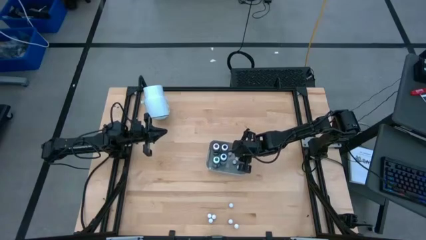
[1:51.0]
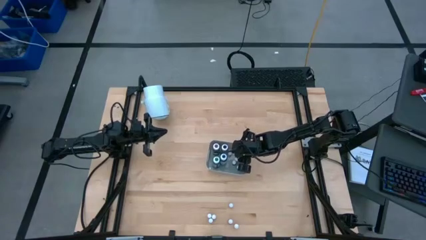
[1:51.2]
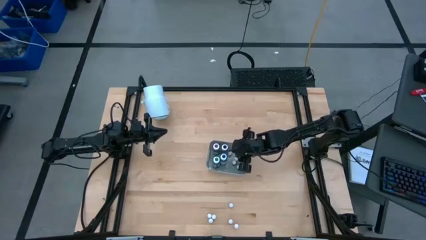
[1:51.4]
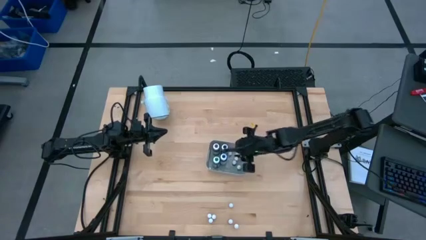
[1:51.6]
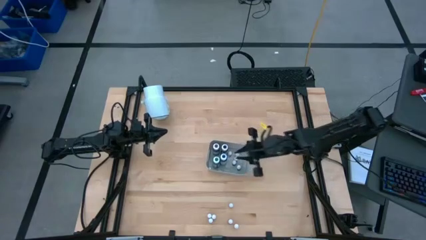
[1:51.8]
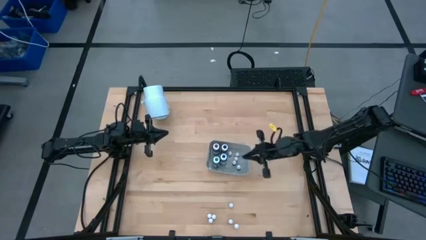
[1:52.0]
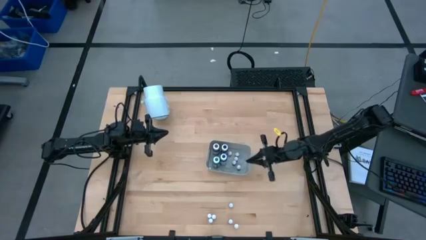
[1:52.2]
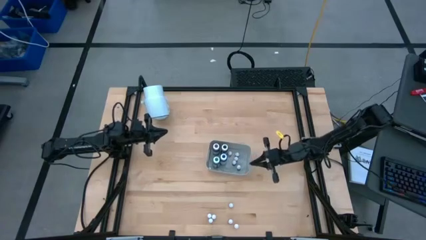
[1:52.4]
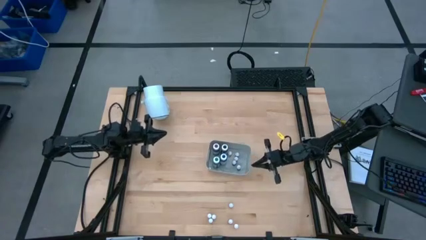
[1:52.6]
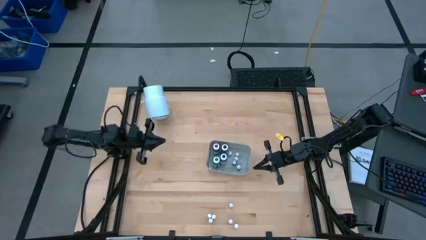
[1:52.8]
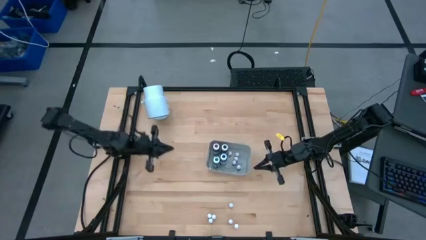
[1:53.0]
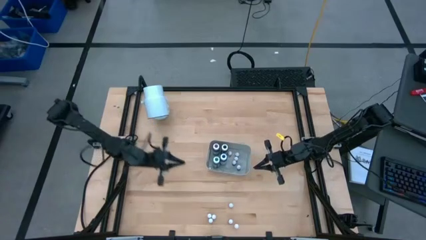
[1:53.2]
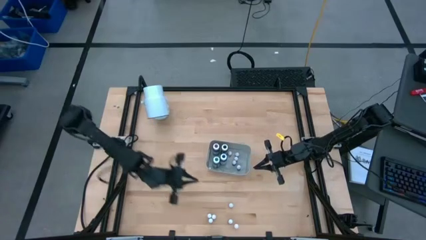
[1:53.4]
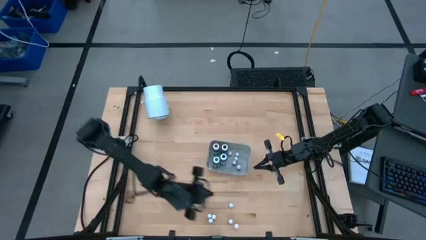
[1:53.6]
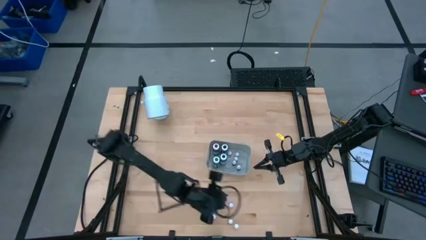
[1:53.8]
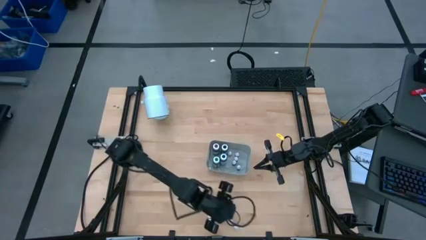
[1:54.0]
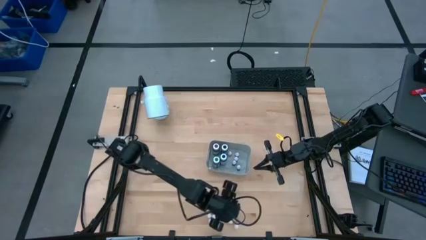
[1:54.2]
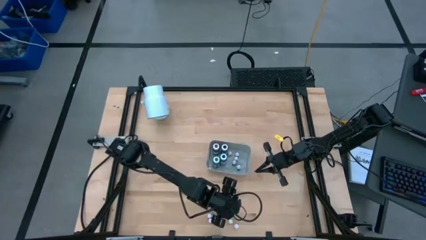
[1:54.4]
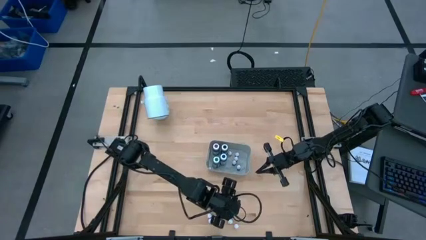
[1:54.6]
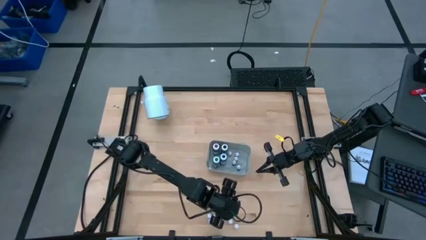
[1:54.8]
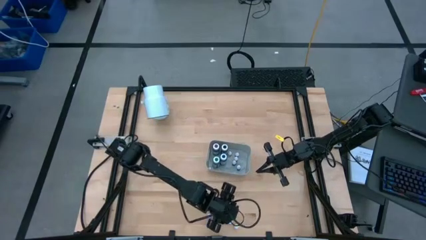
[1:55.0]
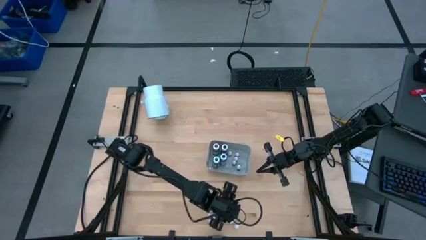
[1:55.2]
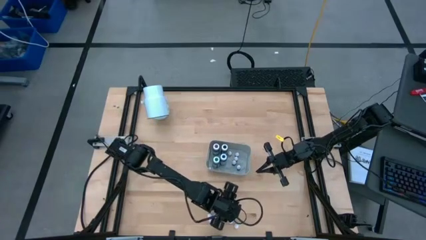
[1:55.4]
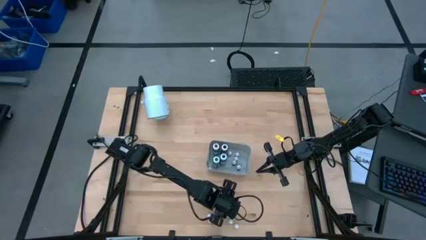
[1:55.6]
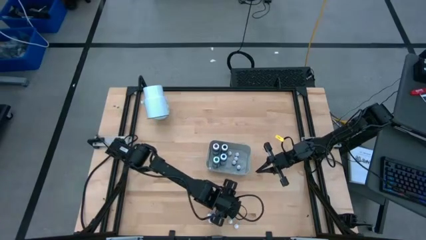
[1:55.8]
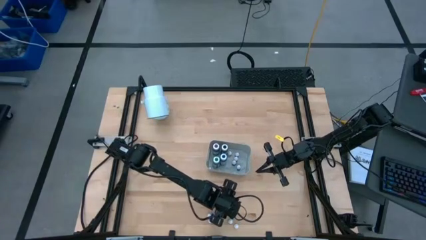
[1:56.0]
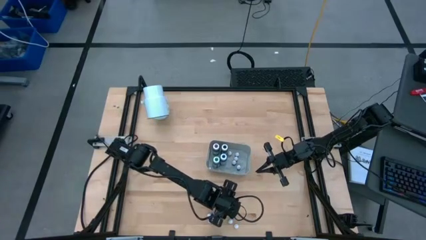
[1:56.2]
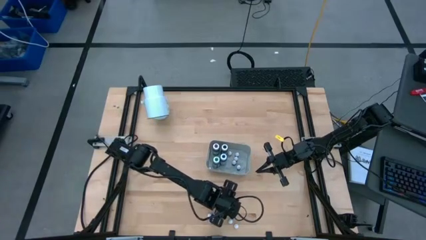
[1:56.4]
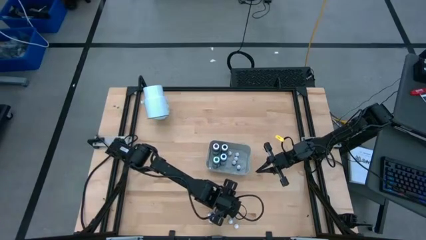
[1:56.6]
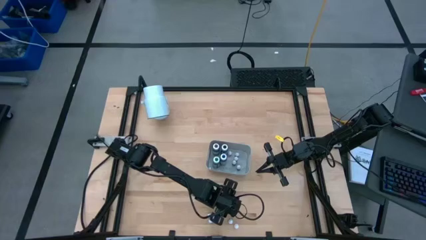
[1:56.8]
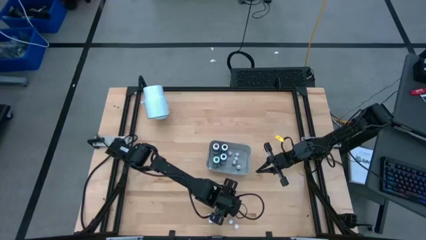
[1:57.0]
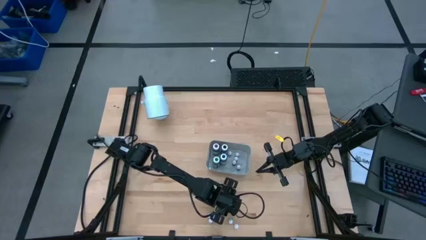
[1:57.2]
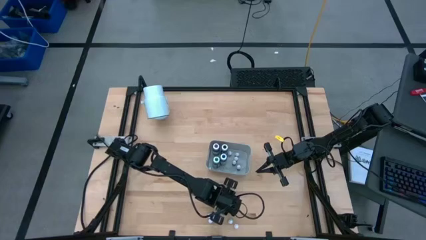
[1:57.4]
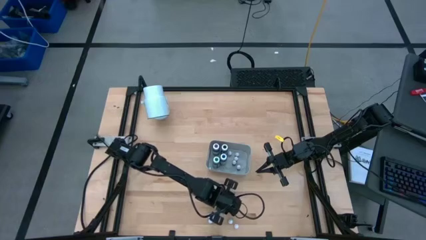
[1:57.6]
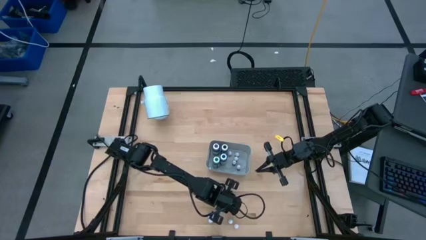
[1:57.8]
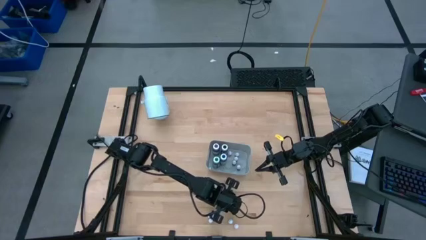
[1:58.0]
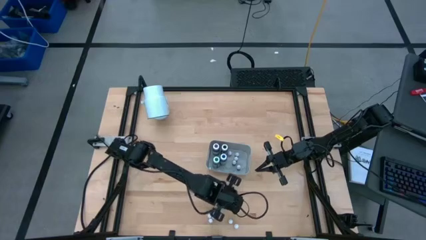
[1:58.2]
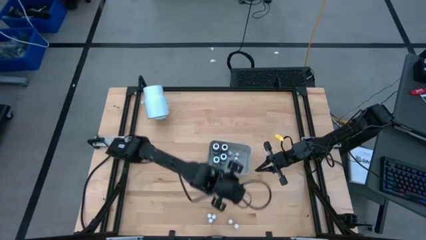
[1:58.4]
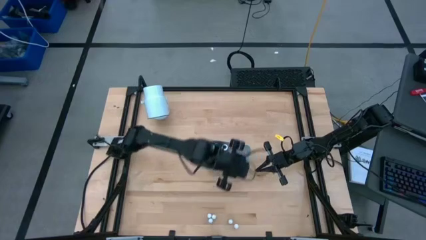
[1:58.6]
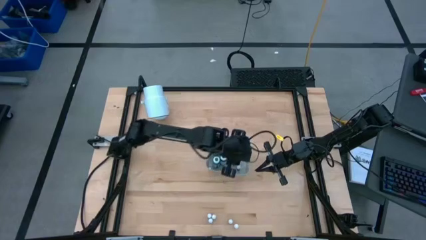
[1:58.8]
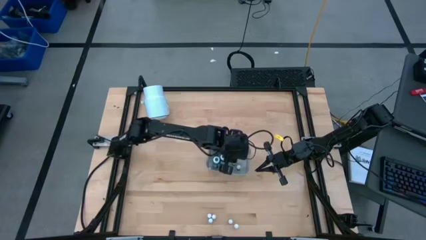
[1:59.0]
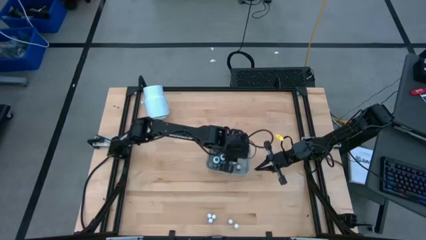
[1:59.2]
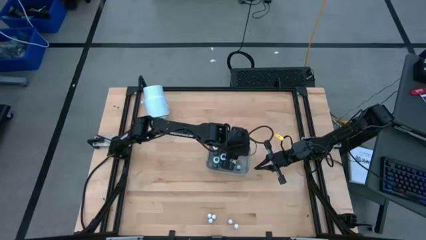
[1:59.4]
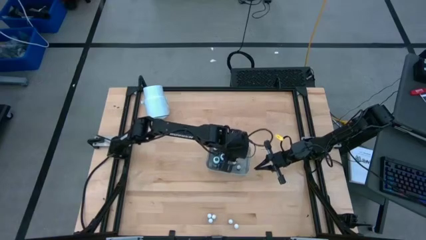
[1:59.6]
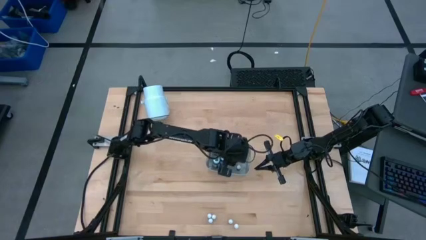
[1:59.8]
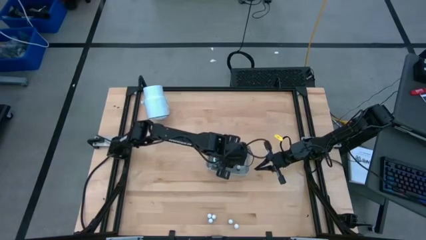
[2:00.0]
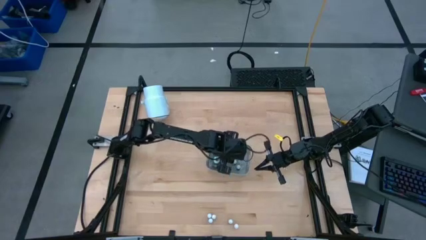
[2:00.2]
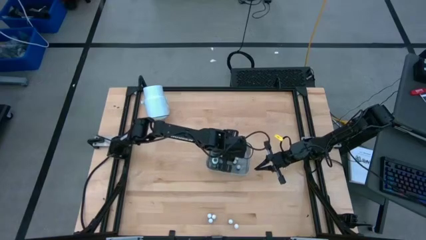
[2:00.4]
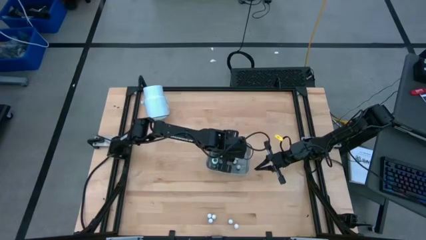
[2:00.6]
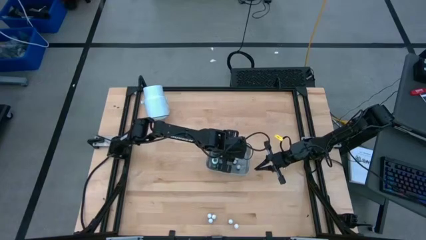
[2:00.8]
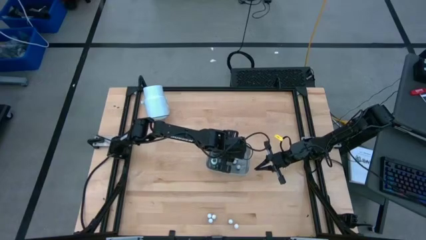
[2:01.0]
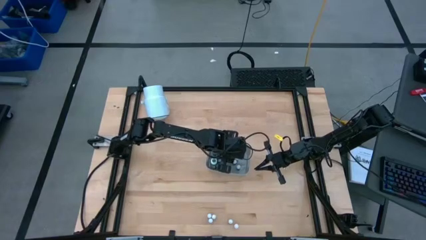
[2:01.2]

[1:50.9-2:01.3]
Task: Pick & Place food coloring
Put the small black food coloring bottle into the bin

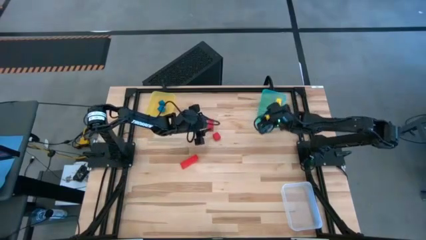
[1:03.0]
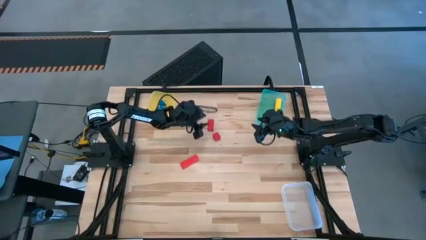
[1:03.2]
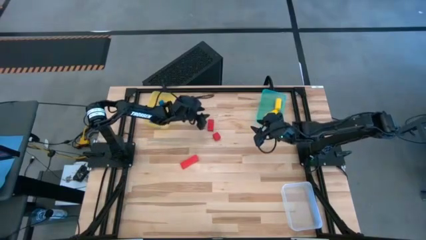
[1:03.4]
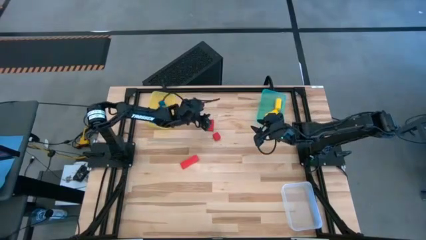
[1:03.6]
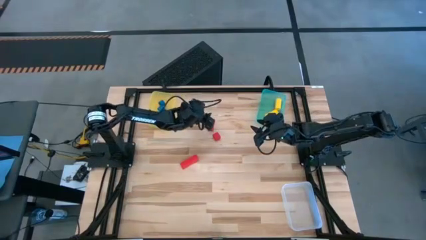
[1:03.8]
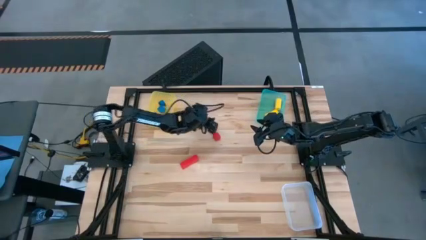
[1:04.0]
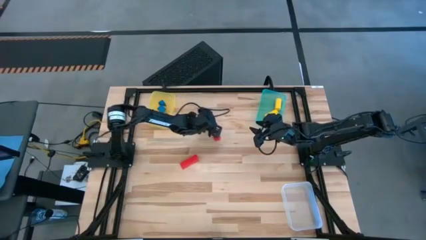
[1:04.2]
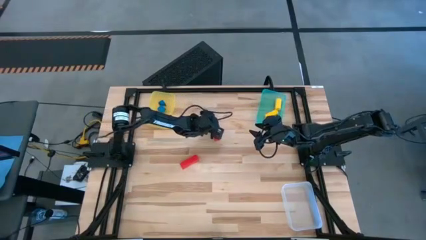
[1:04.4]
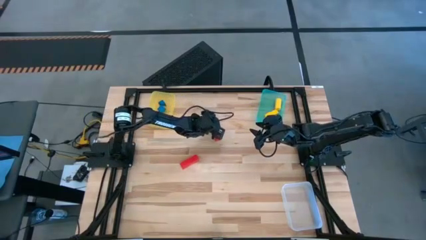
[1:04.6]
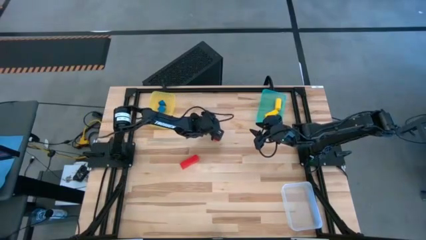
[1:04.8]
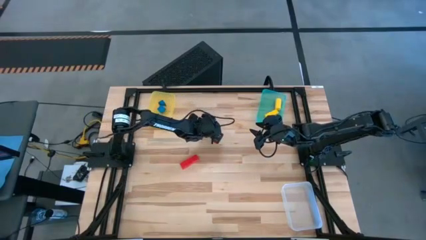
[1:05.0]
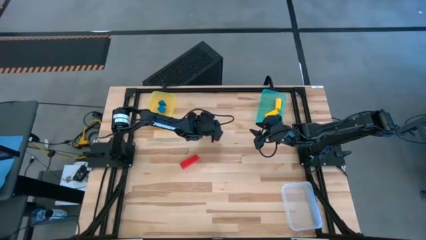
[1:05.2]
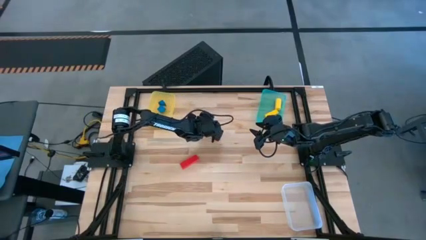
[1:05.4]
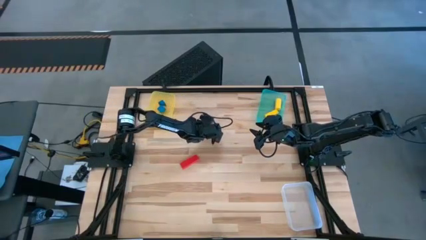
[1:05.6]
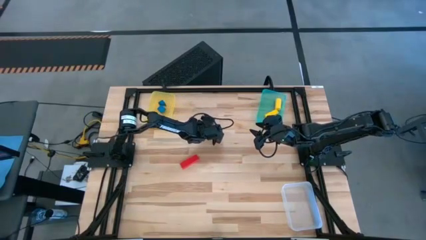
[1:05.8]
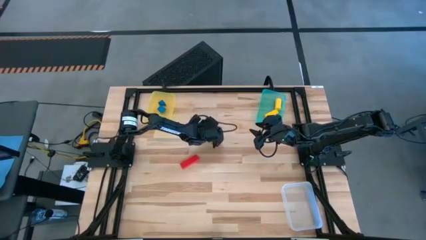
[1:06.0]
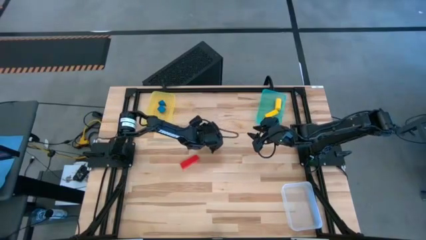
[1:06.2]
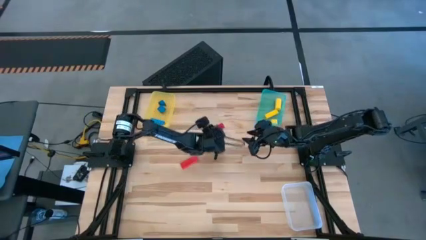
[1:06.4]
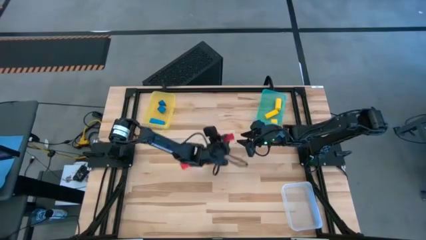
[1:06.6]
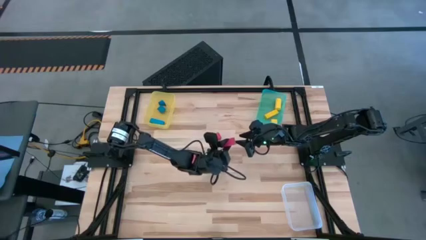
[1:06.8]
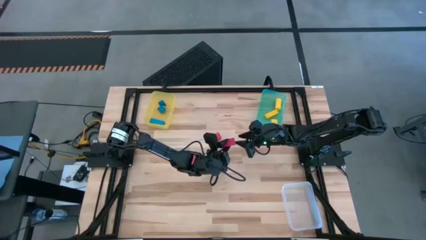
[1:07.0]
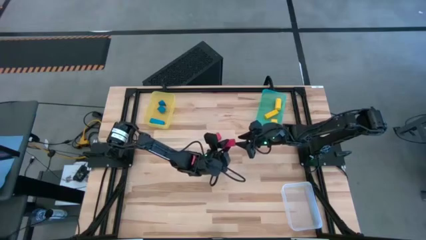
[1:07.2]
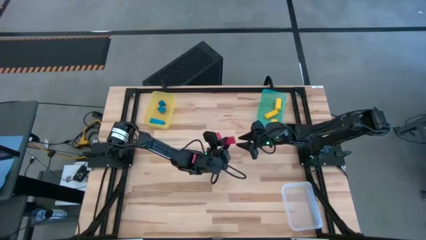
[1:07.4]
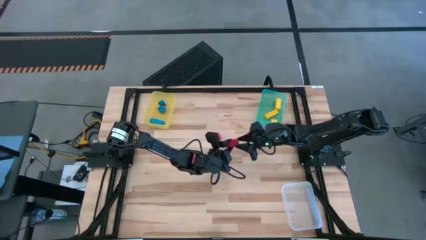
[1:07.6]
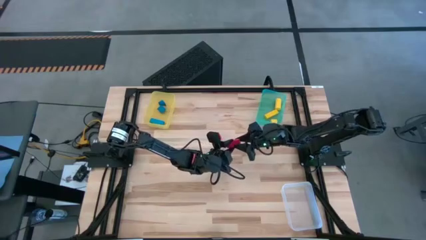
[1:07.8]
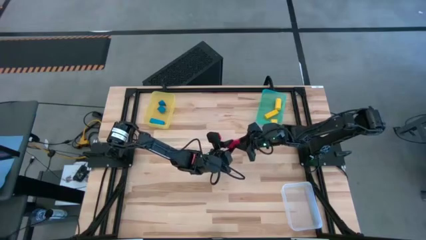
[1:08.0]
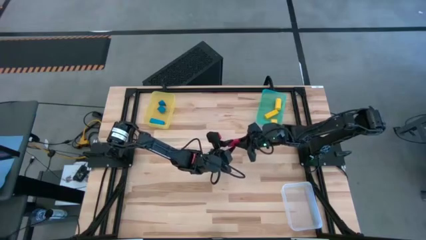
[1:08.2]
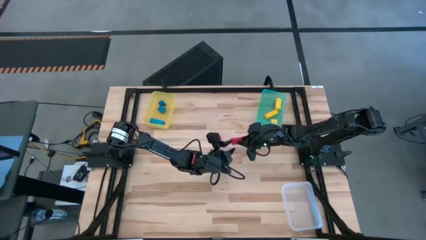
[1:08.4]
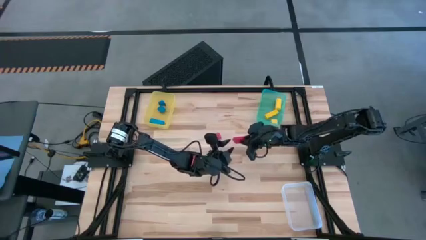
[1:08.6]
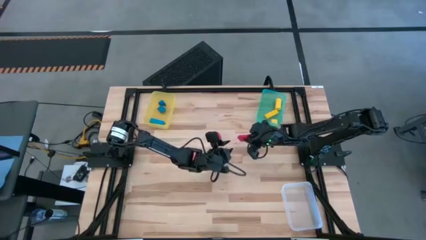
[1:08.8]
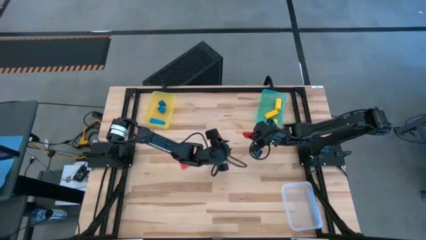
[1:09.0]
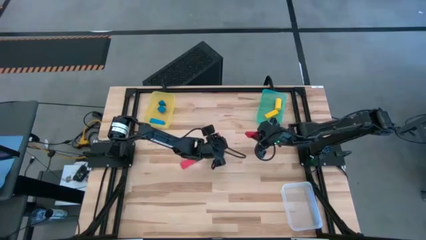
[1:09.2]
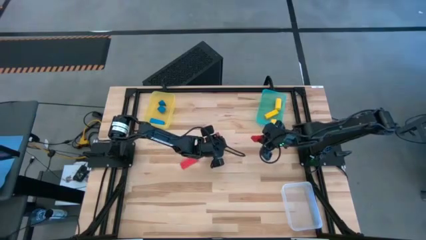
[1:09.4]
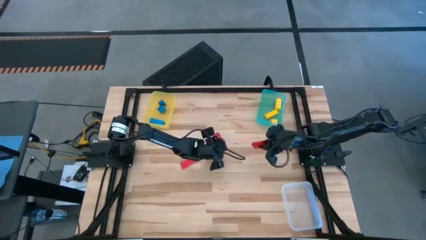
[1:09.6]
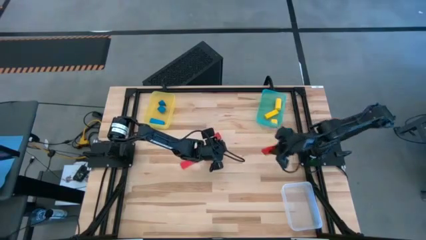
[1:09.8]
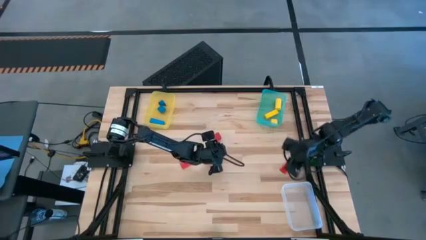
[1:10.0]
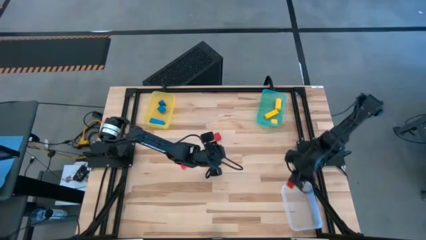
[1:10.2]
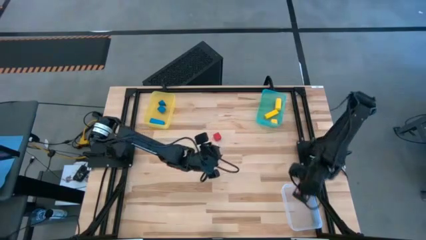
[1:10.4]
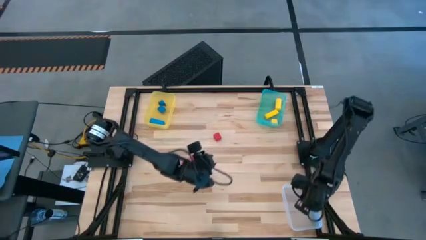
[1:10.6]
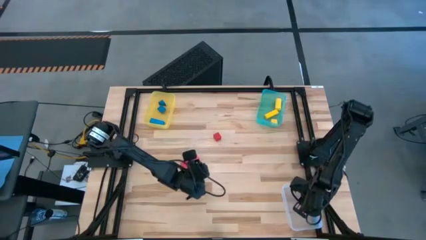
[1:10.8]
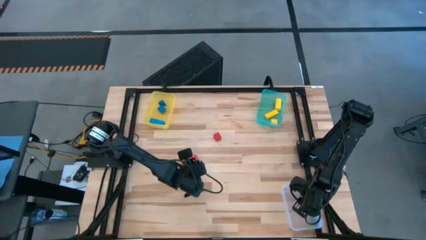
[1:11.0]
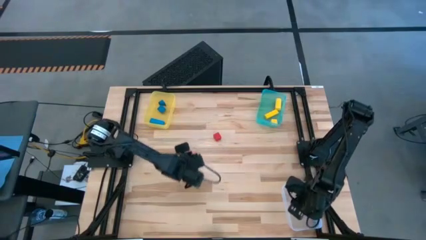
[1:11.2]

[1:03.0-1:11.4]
Task: Sort & place blocks by color
Put the top red rectangle game block into the white transparent bin
